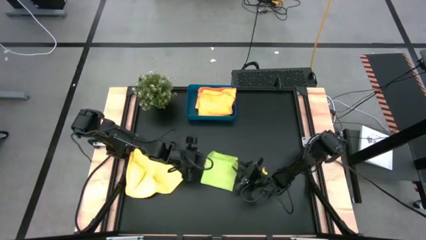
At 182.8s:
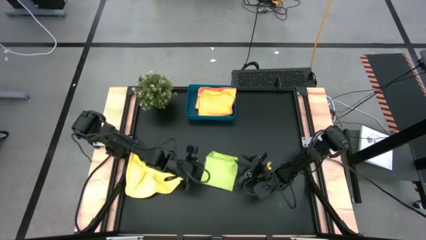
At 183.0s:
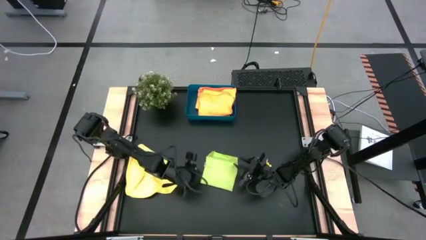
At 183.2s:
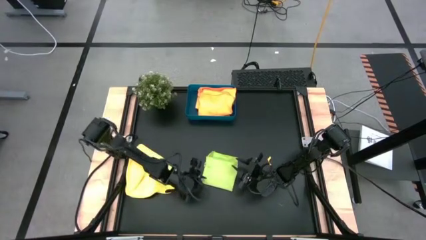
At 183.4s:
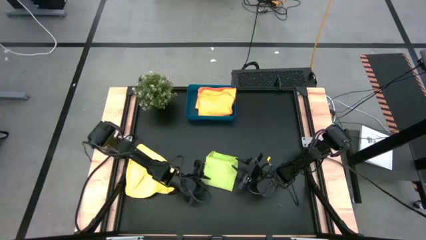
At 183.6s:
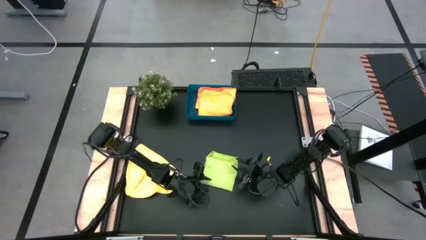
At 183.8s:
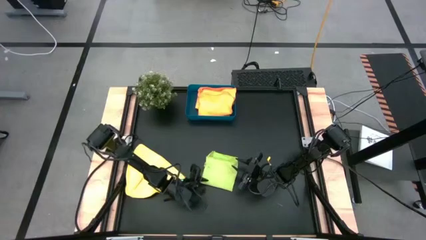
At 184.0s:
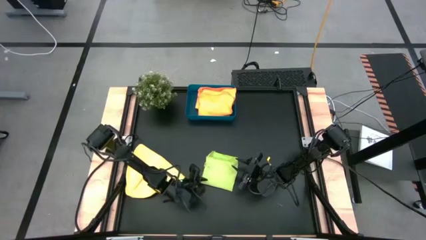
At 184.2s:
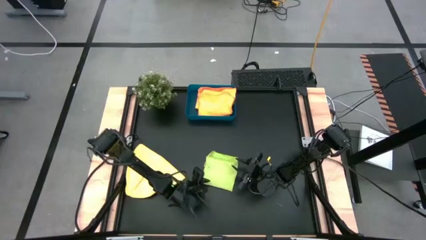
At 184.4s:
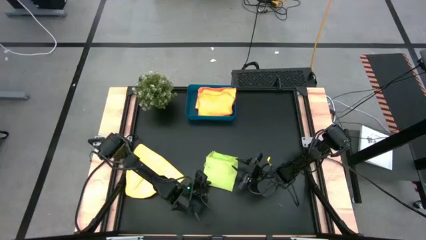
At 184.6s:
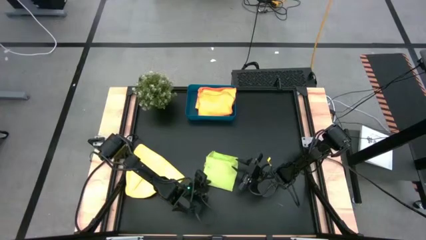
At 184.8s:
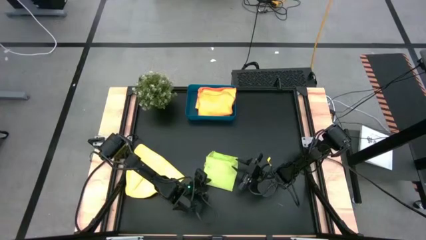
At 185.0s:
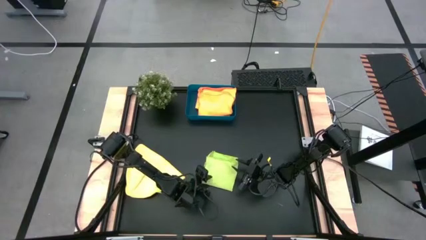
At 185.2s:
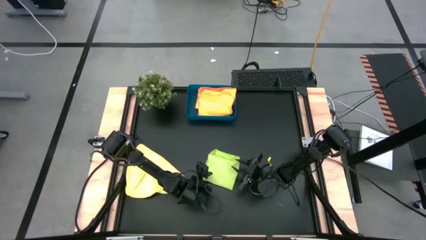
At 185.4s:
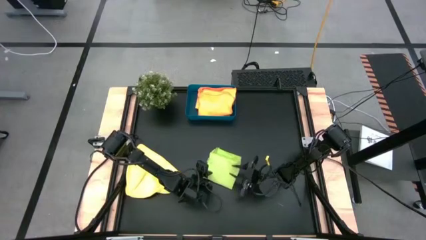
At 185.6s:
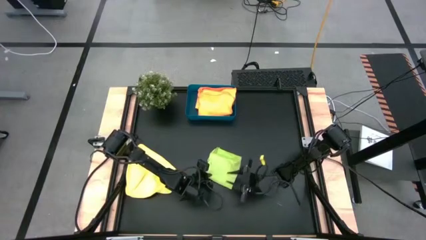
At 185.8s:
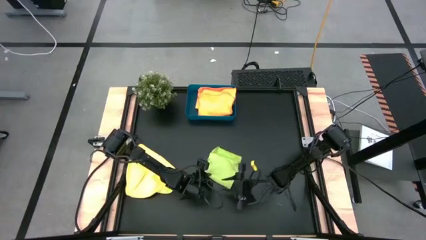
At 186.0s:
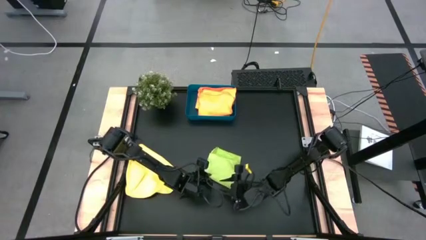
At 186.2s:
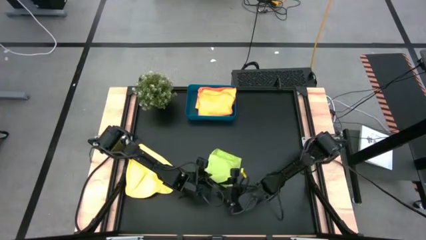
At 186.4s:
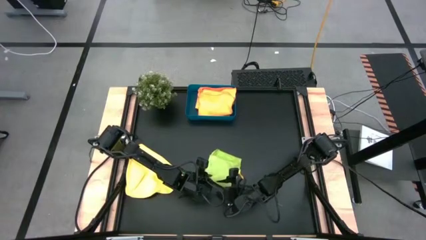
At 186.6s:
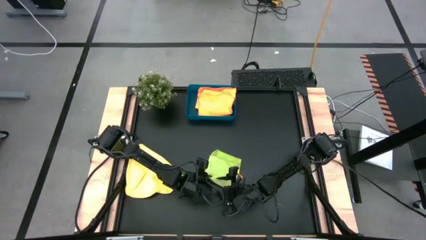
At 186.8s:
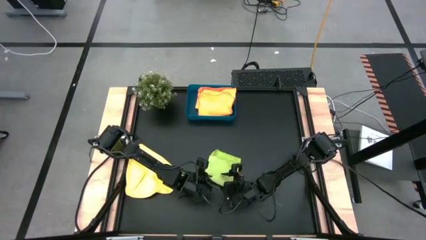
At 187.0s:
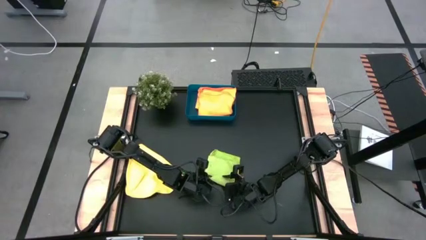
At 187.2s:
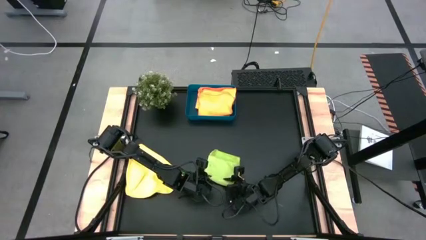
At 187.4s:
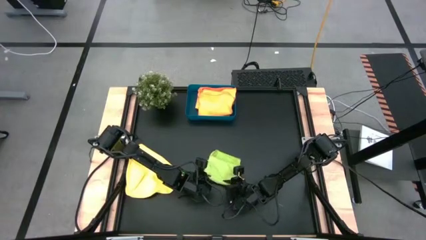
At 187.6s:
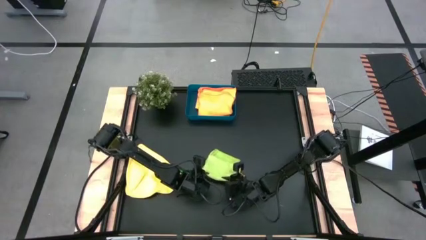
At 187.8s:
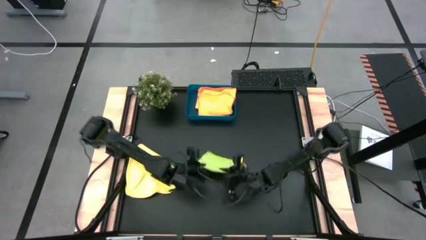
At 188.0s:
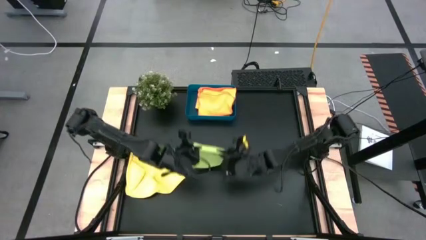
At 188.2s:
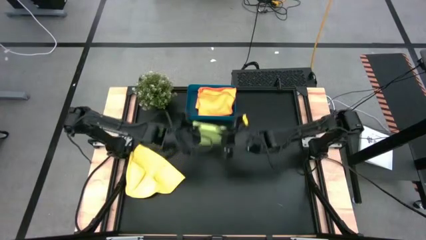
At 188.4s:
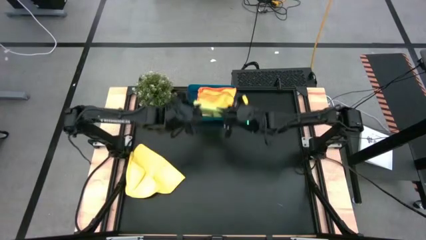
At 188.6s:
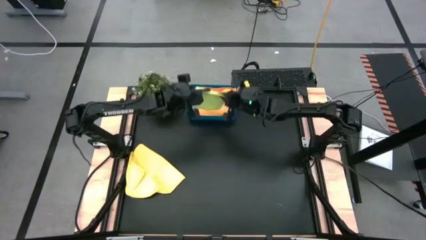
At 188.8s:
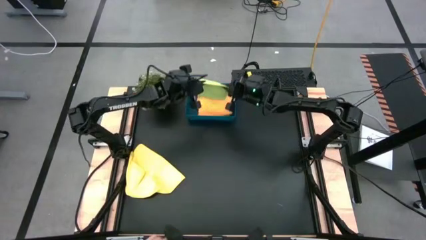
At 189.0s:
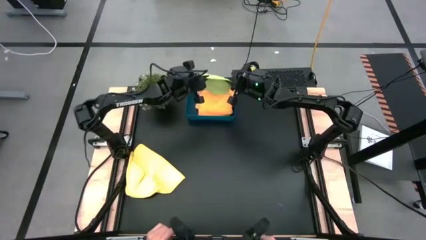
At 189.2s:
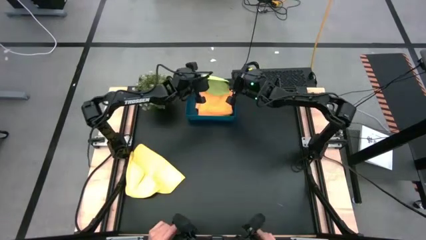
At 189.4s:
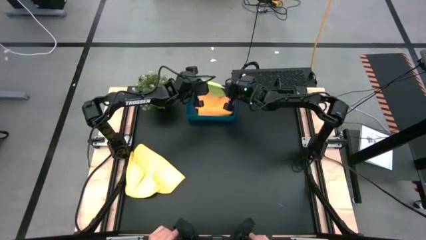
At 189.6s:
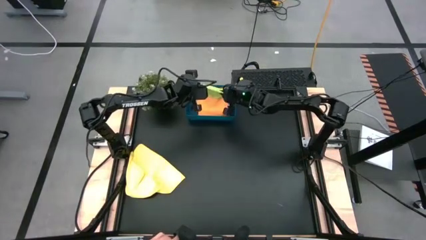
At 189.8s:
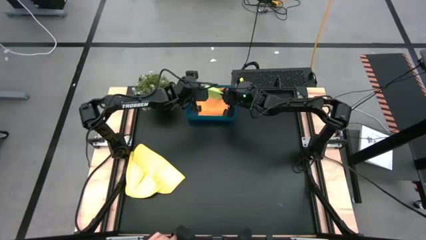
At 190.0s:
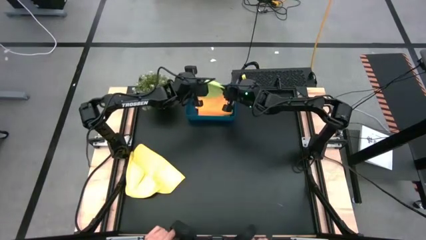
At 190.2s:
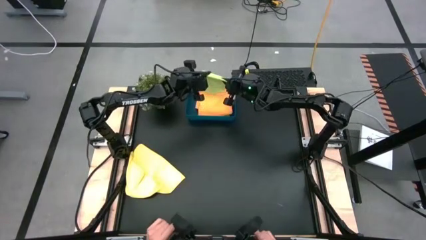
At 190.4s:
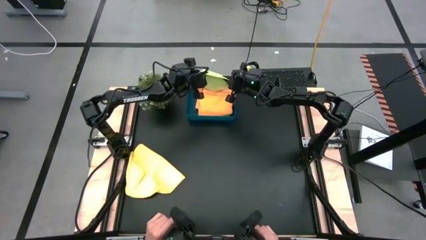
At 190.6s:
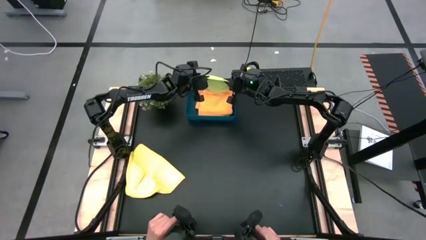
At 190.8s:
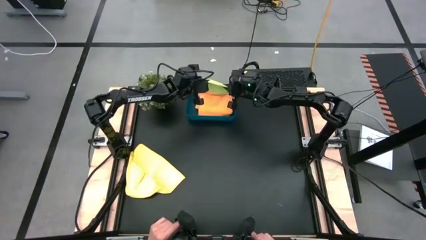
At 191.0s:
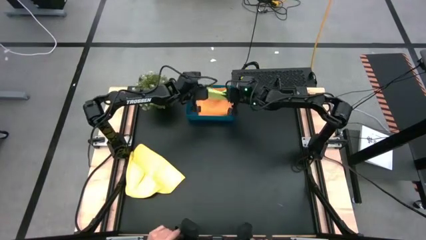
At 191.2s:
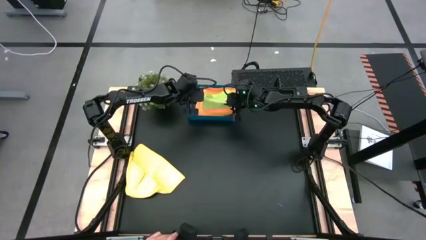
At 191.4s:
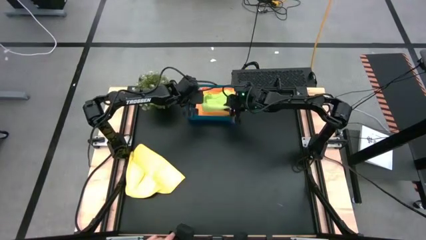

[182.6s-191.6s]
Task: Fold microfiber towels
Put the green microfiber towel into the blue bin

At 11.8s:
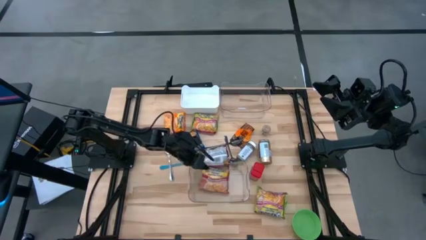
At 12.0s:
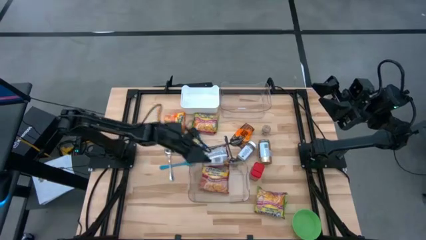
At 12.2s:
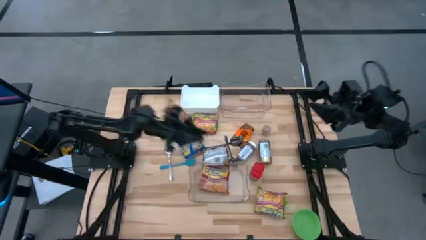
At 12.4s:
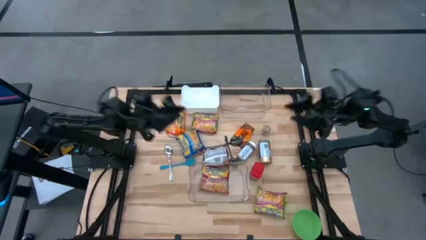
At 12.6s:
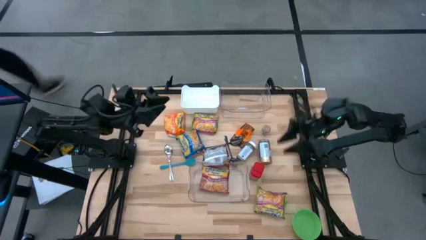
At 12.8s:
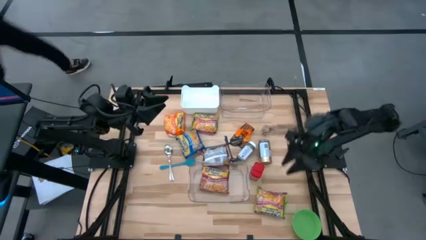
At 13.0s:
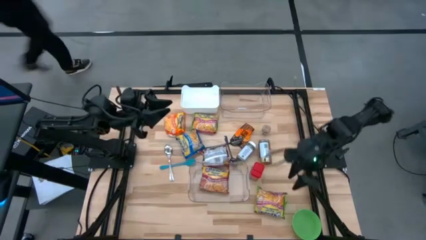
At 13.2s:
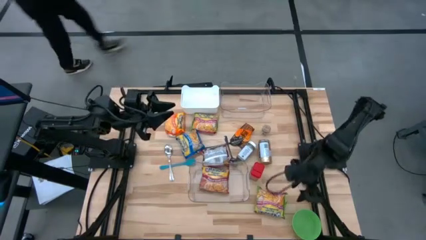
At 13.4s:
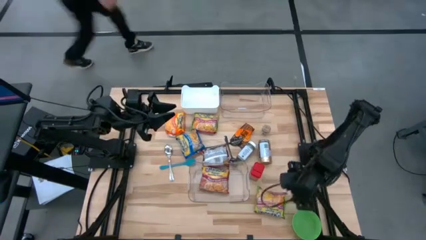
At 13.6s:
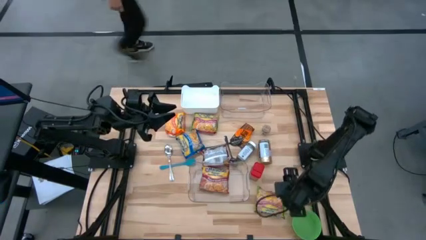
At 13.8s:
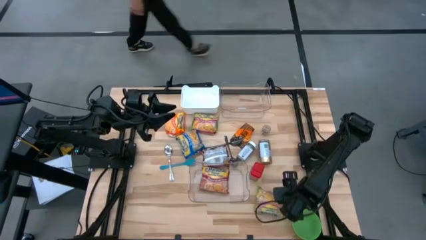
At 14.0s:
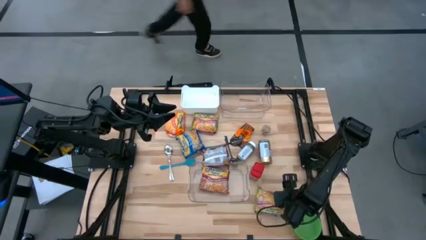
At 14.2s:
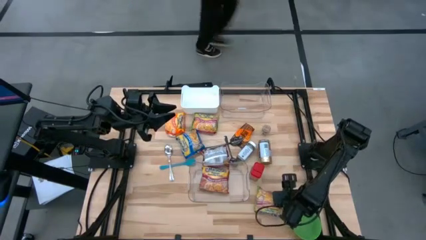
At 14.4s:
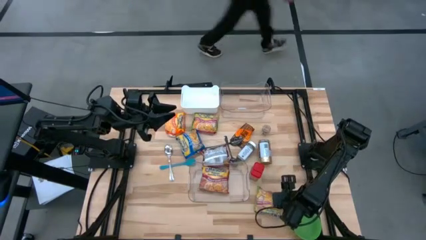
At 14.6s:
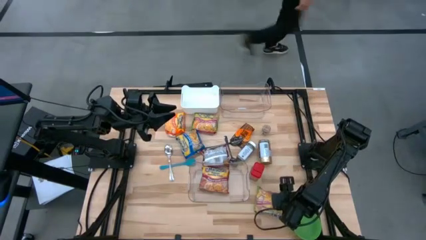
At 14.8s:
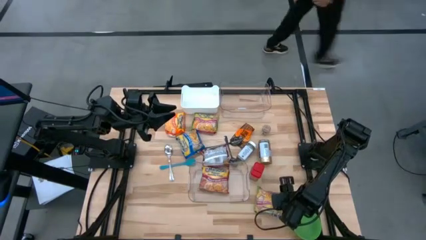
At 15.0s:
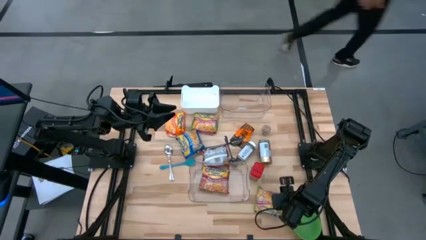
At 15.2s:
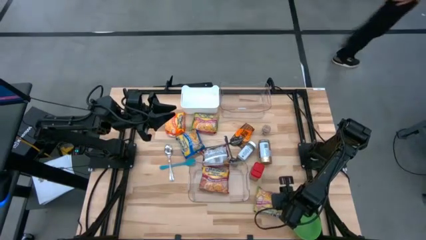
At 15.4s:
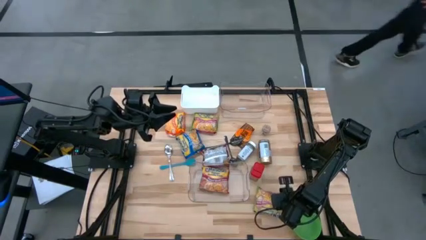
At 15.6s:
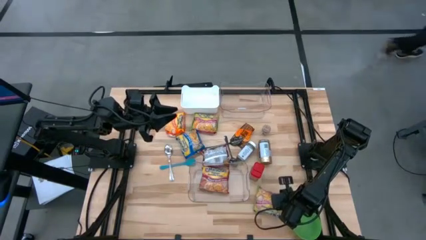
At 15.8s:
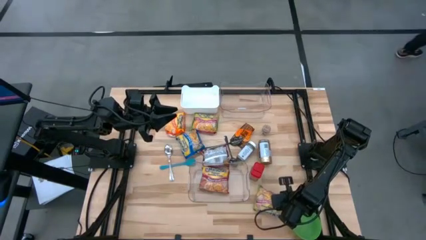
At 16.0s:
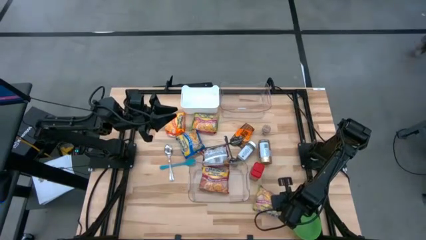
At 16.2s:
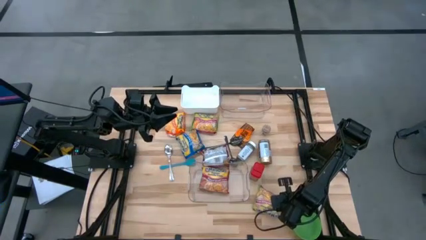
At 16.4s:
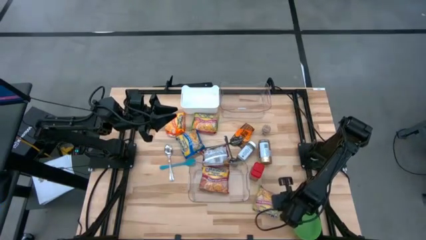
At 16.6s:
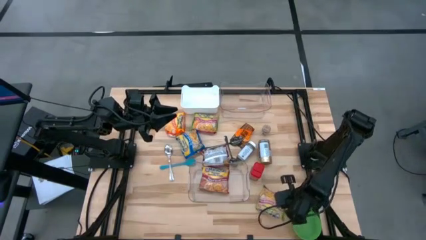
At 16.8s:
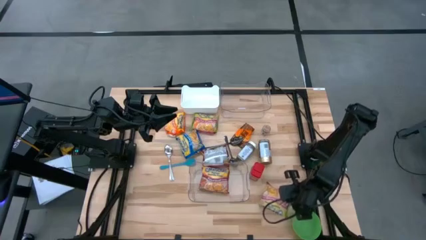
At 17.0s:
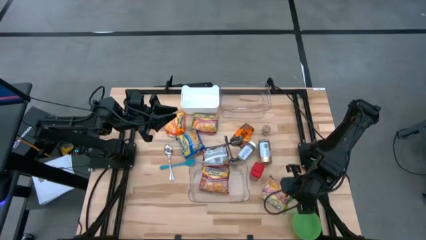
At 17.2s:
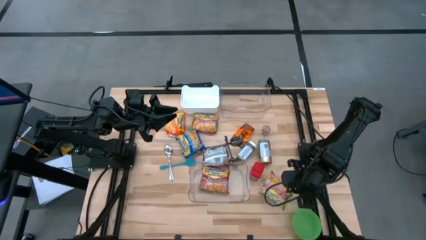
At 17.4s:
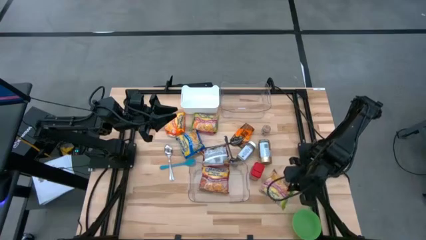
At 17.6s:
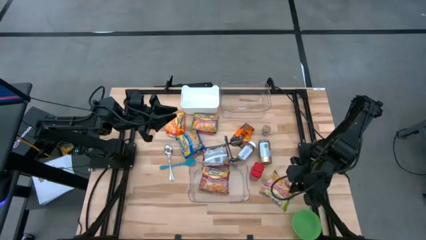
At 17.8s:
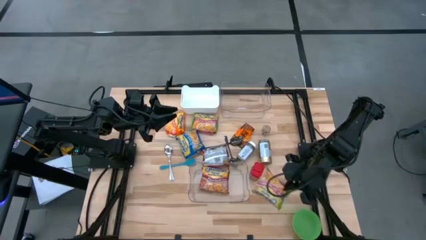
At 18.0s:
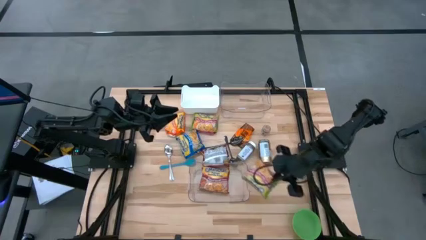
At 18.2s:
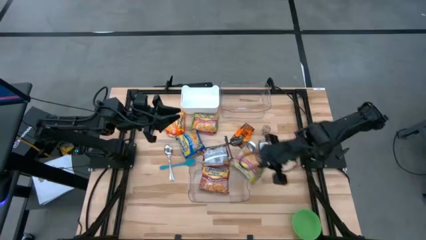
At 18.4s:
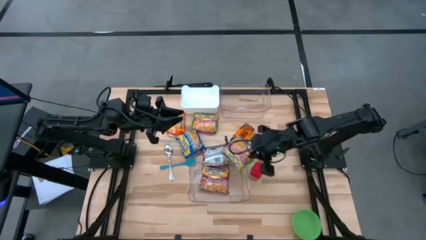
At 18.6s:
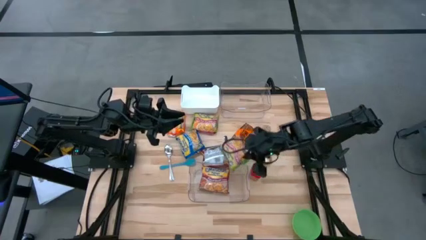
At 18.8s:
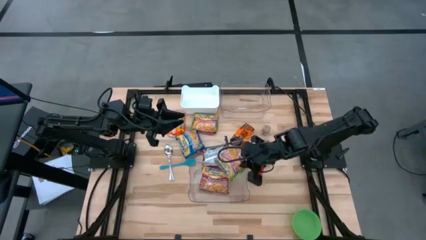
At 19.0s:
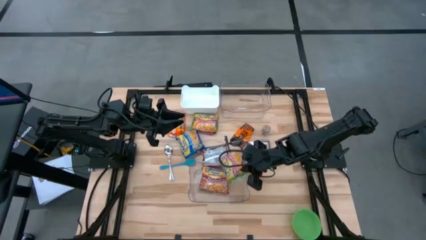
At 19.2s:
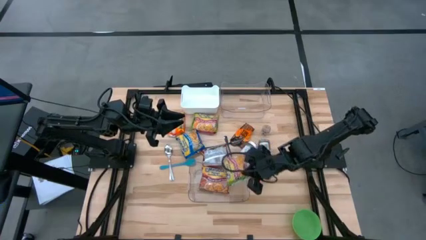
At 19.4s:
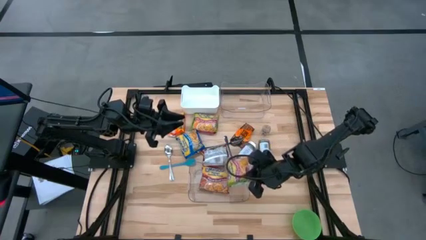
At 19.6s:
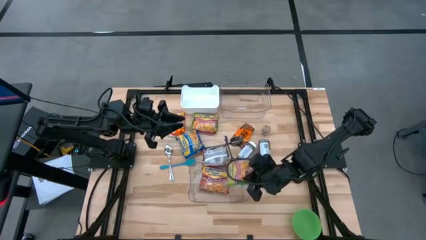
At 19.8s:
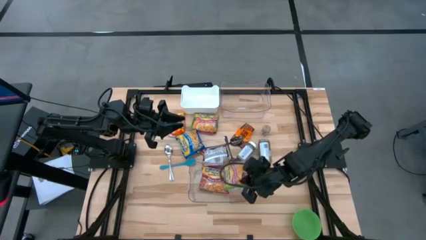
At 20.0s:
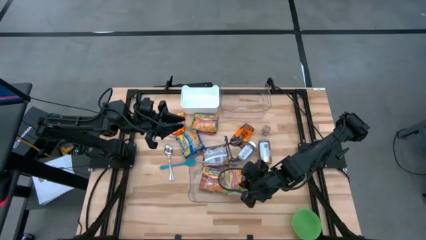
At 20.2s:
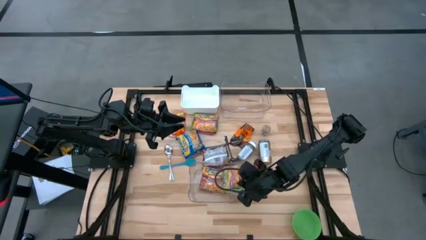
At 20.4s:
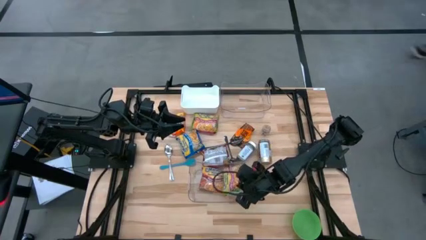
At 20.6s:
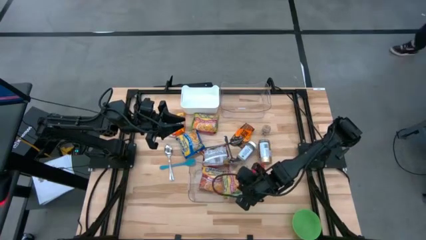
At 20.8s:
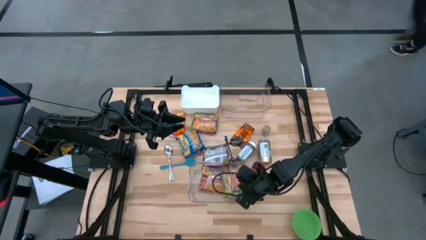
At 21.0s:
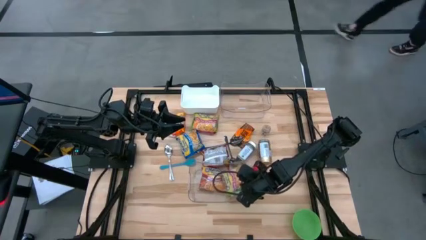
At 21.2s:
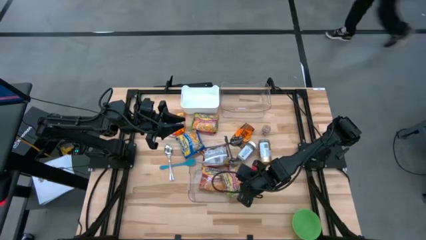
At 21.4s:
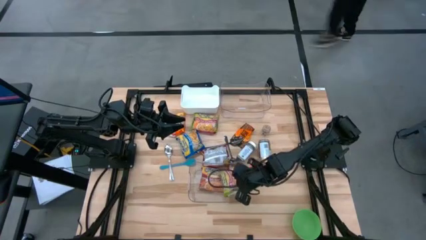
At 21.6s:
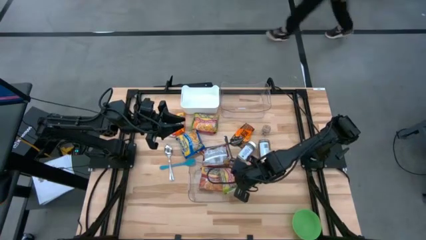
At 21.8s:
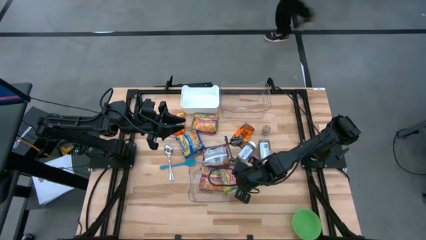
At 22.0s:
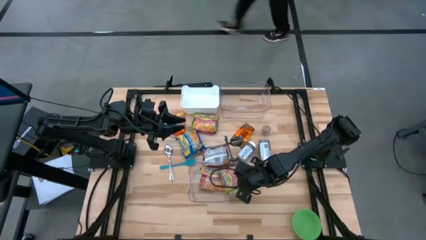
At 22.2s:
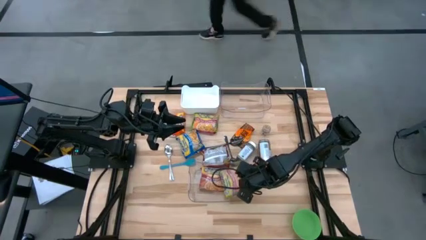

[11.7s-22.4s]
Task: Pick & Place Food Item
Put the bottom green noodle pack into the bottom transparent bin
